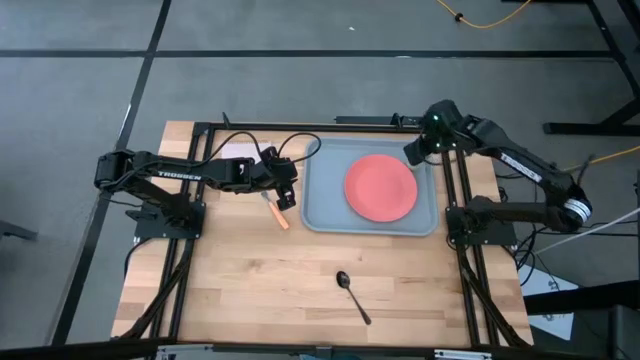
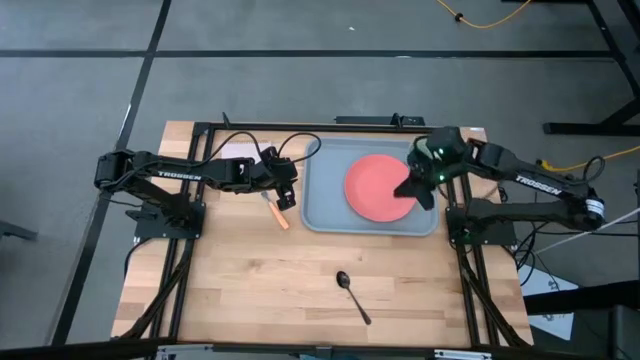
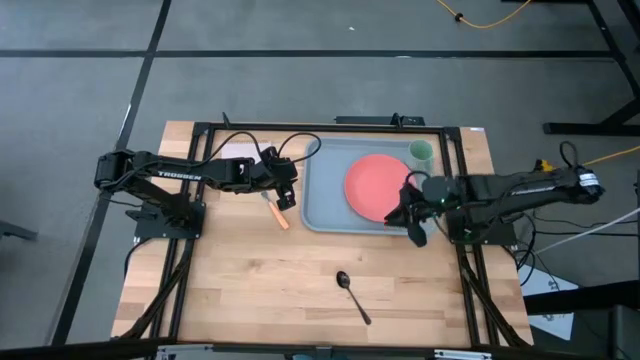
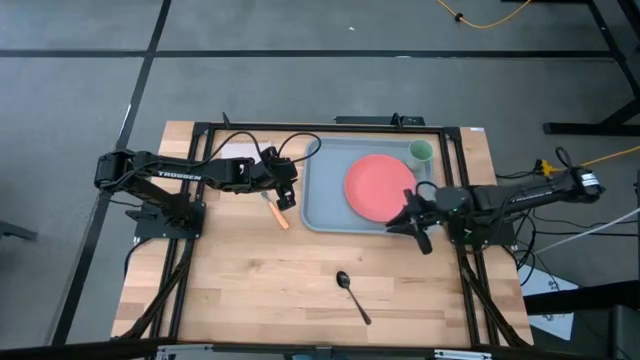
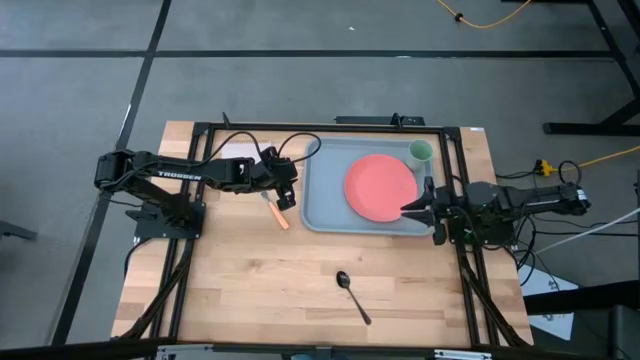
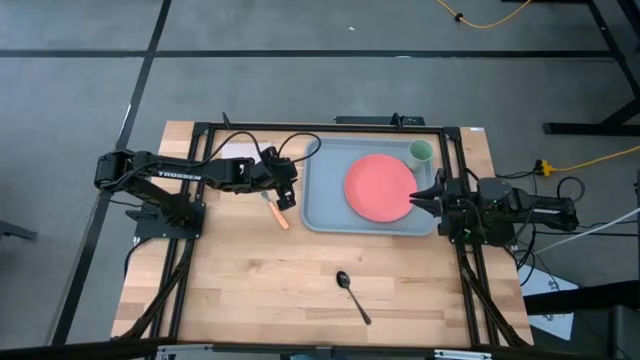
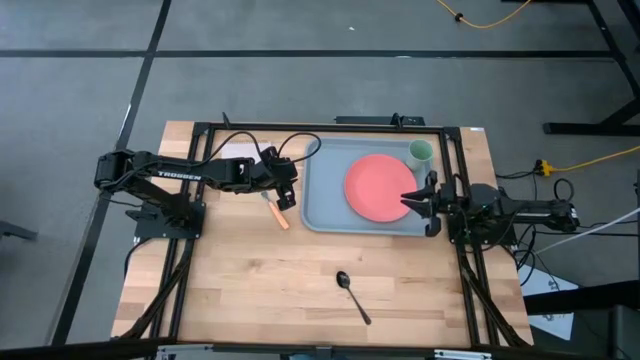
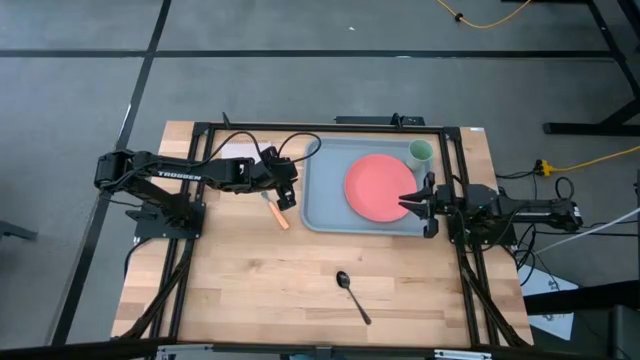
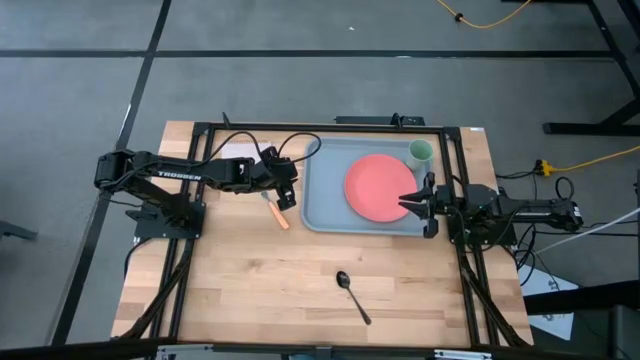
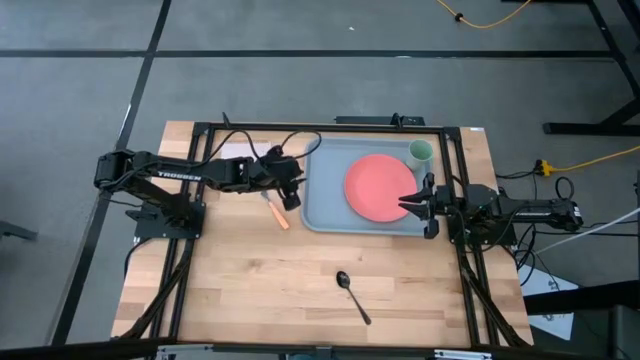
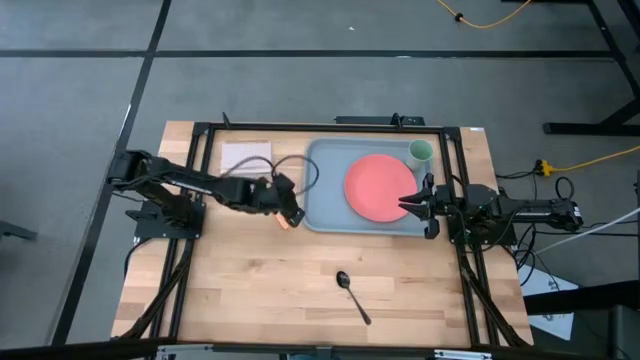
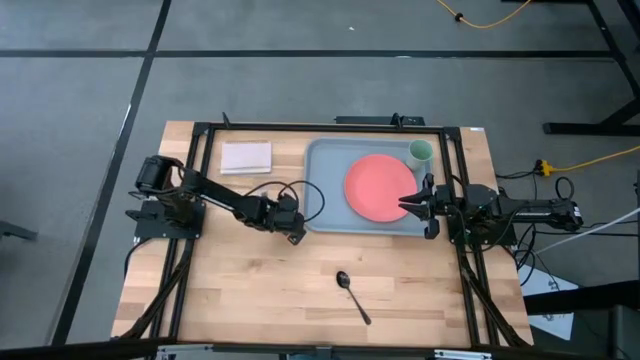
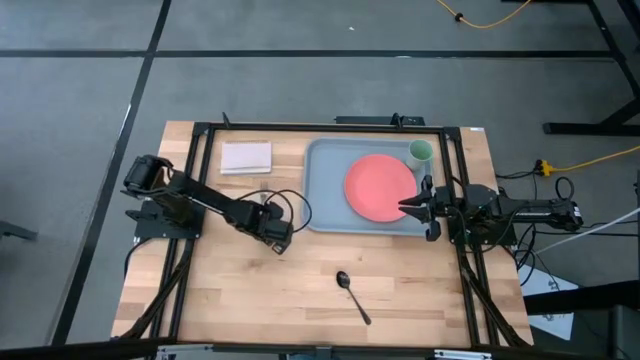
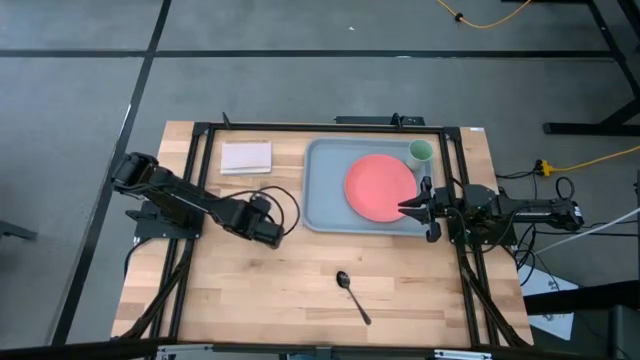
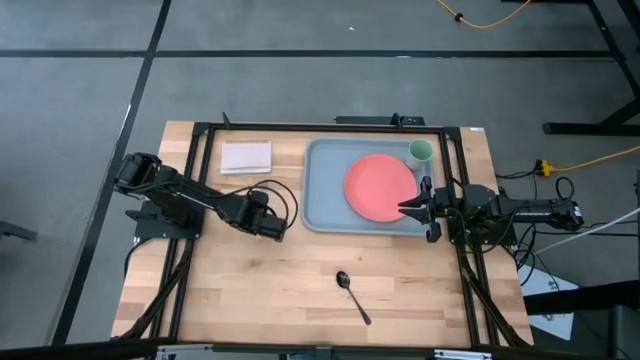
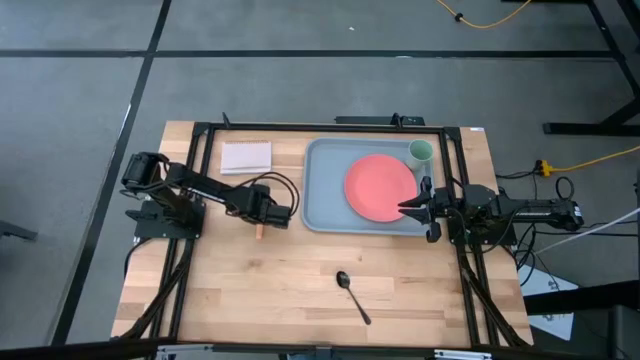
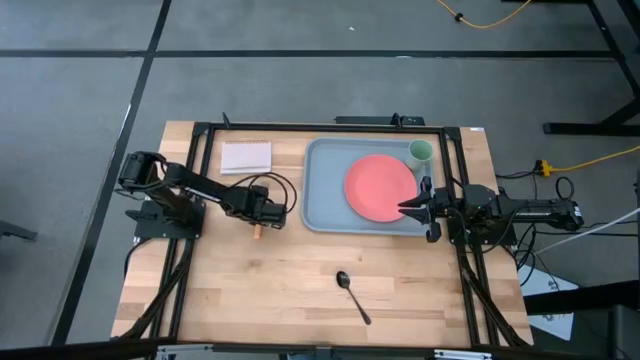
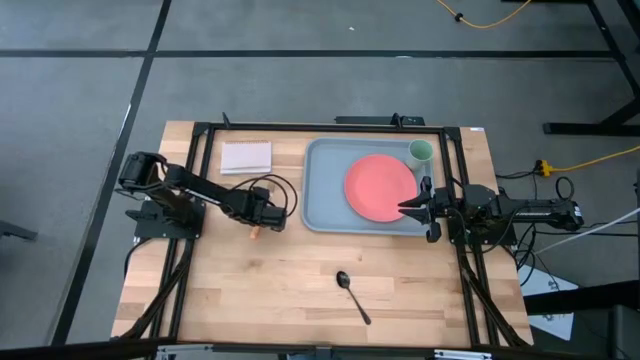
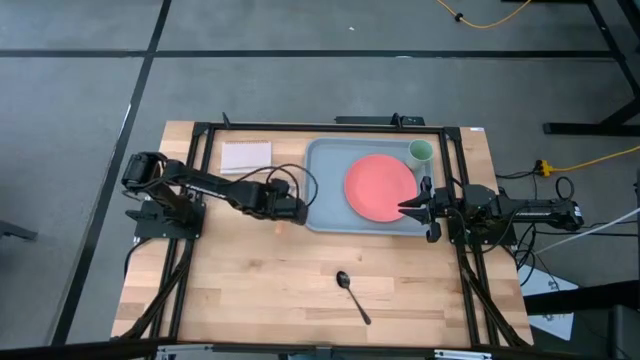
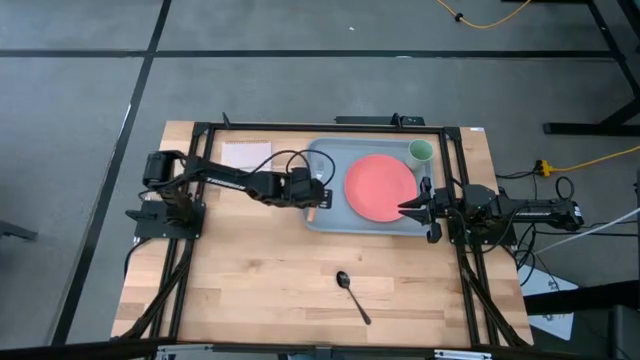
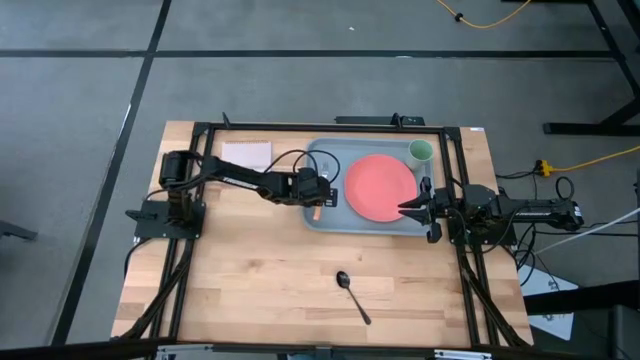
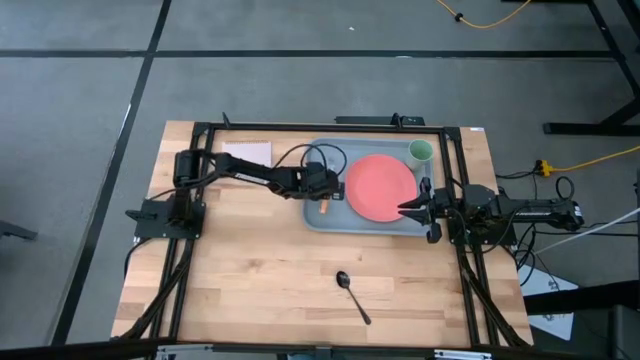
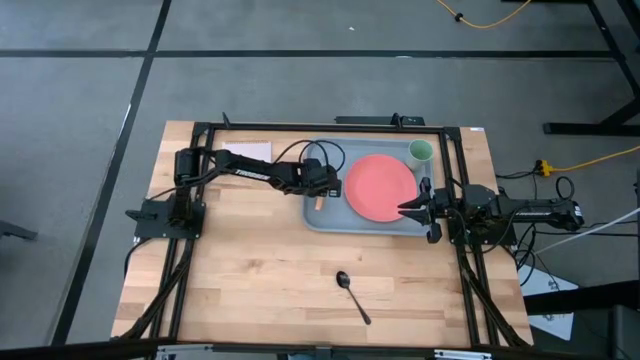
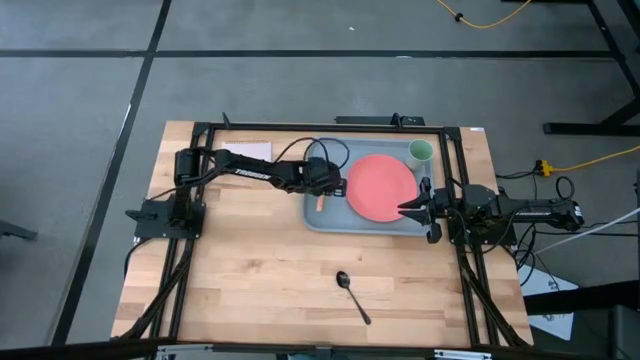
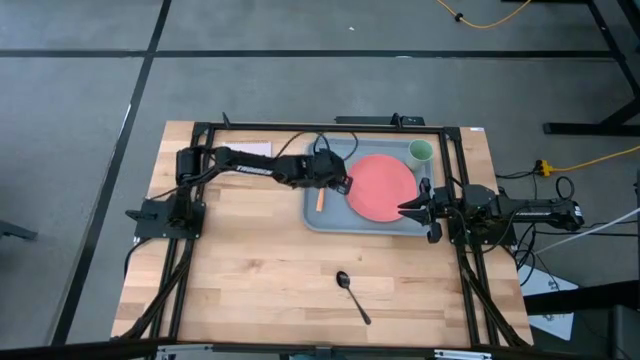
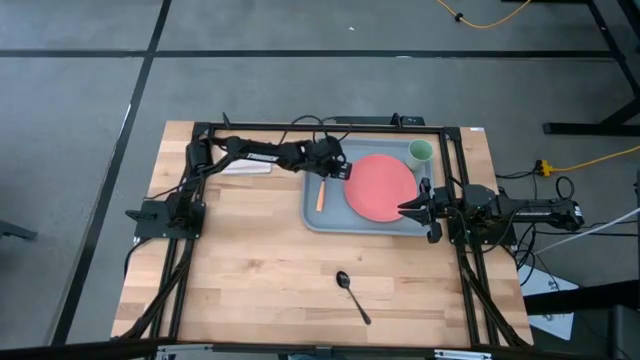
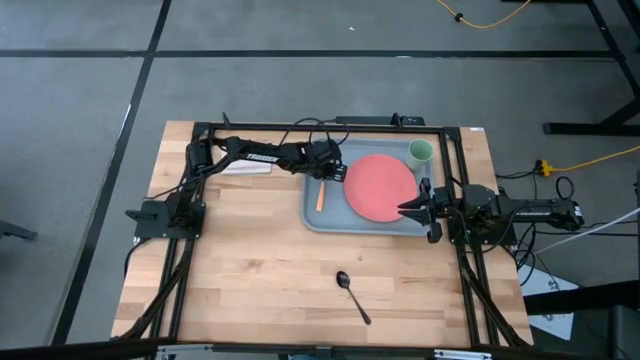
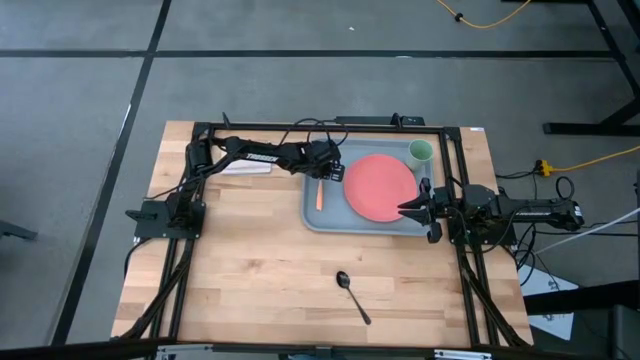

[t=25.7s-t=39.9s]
Task: Pick and place plate/cup/fork/spoon on tray
Put the yellow fork beside the pink plate on the gray serving tray

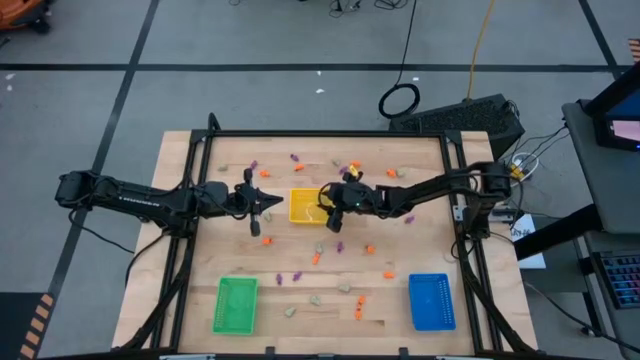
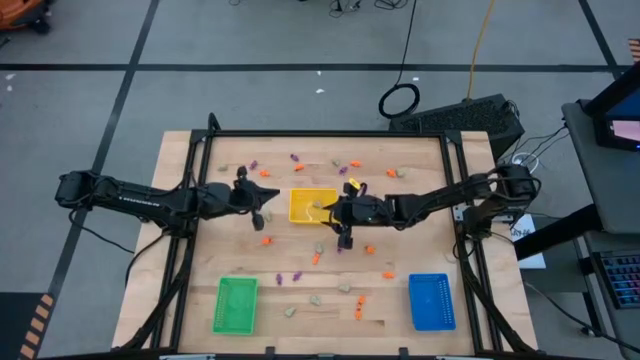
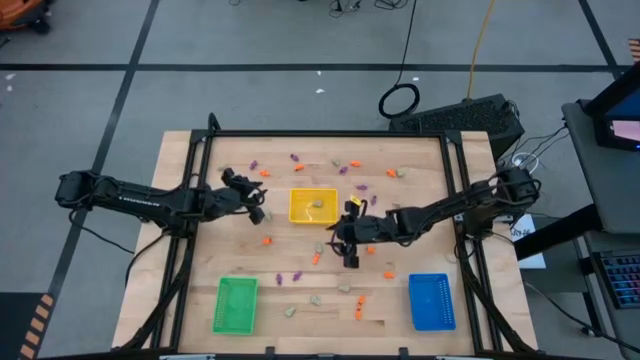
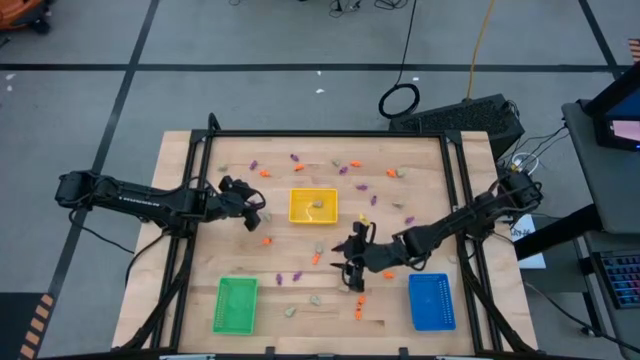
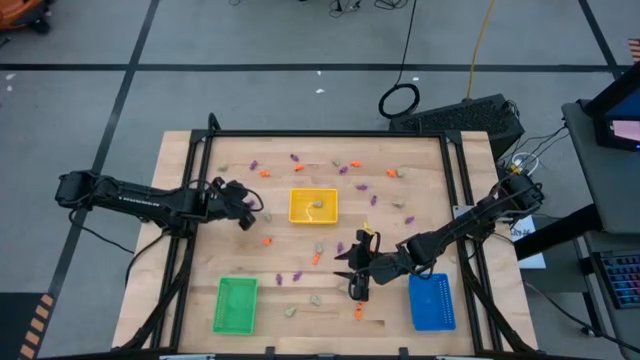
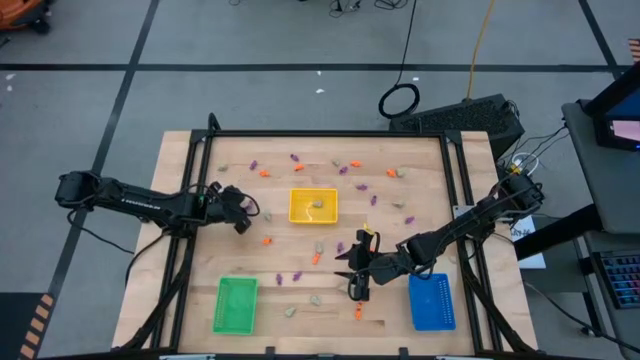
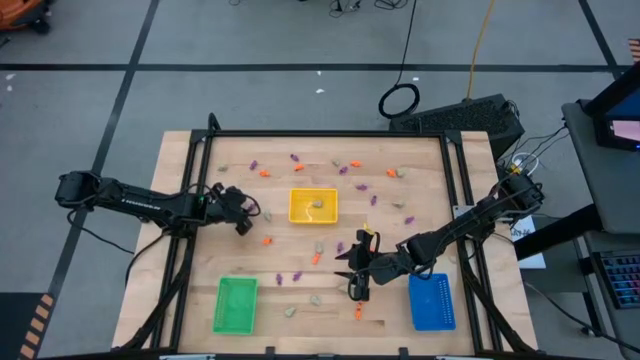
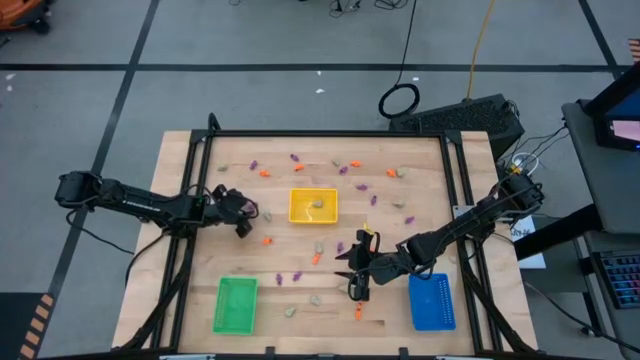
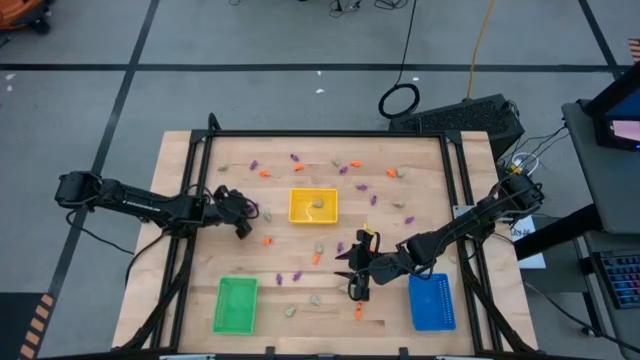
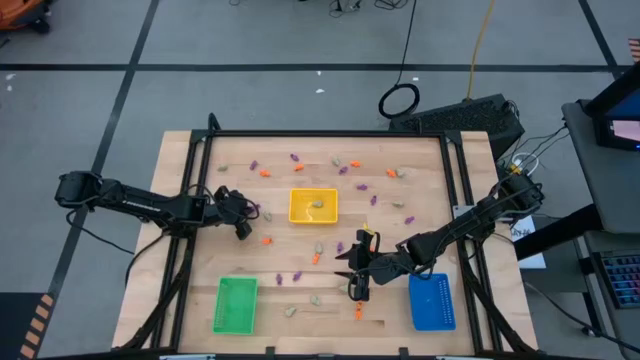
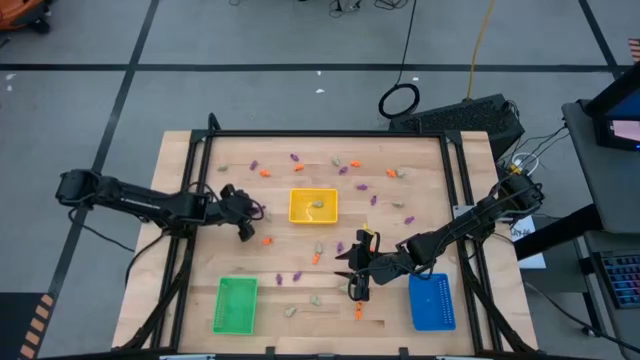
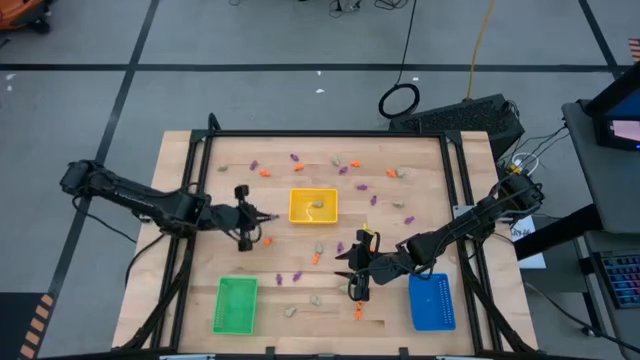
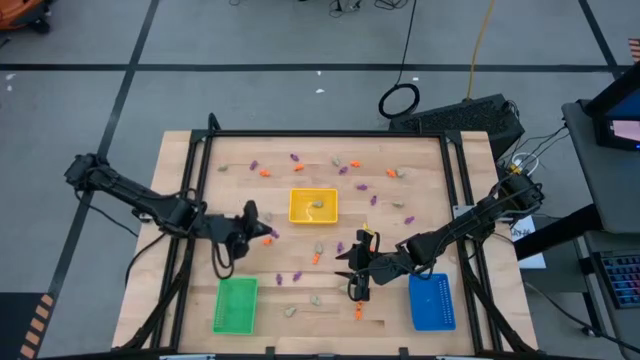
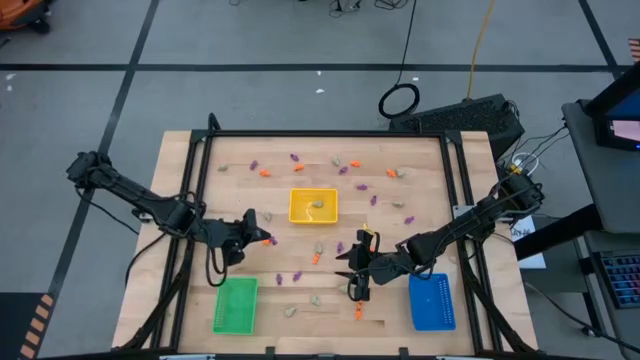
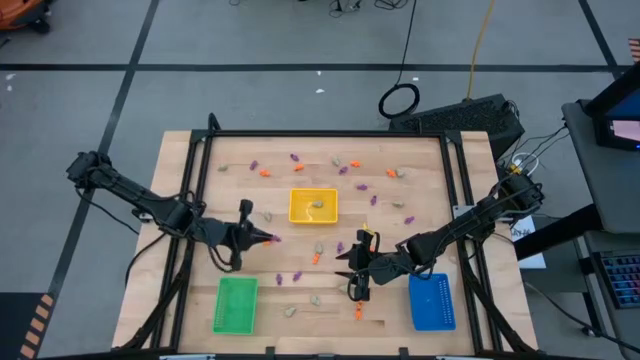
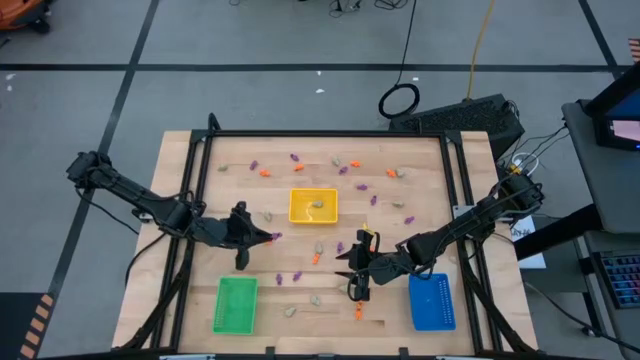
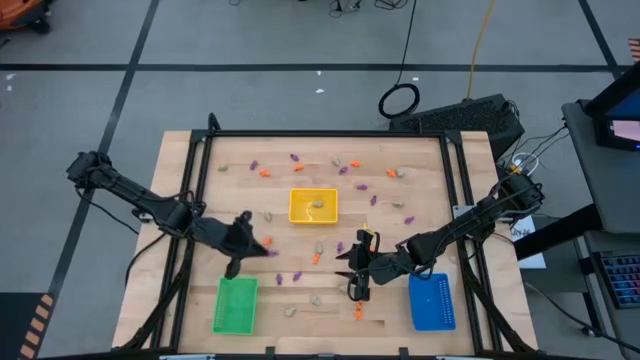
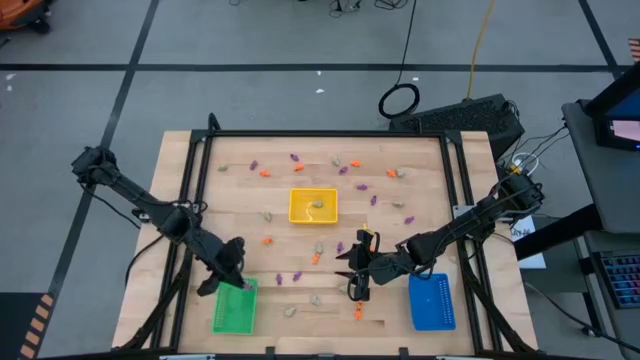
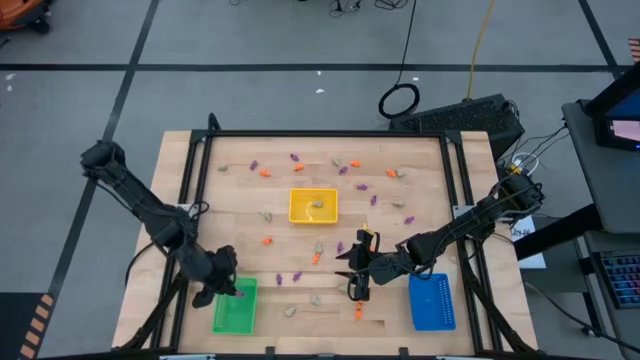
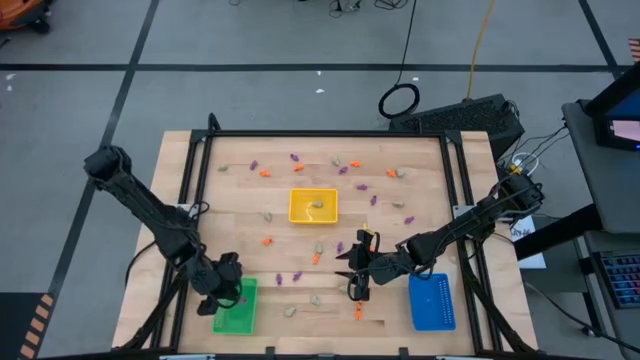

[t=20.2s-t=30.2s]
Task: Sort Halloween decoration
Put the purple skeleton toy in the green basket
